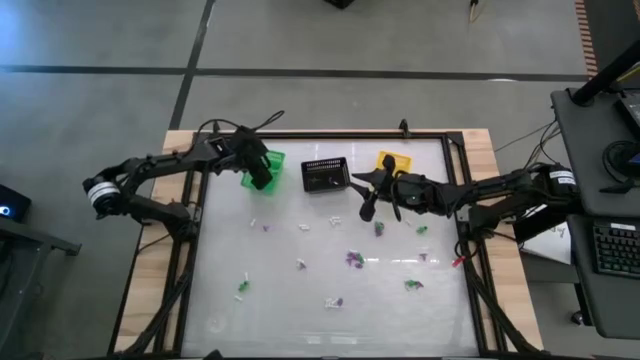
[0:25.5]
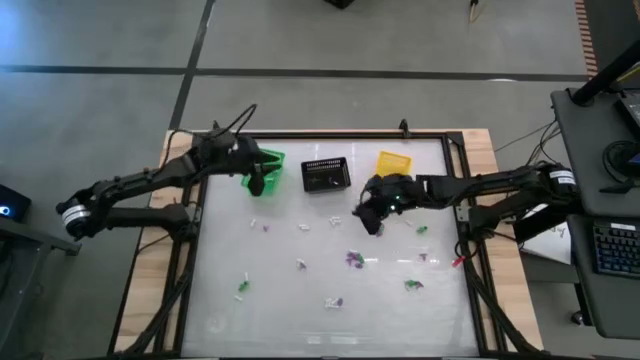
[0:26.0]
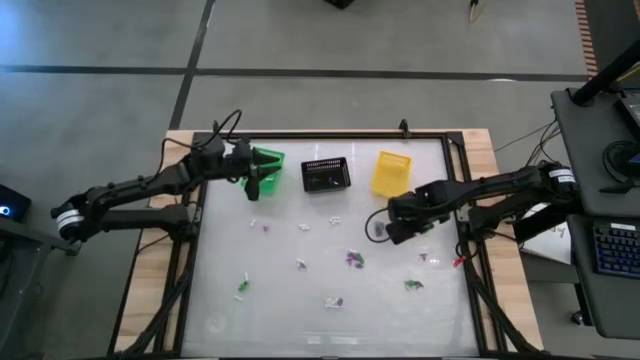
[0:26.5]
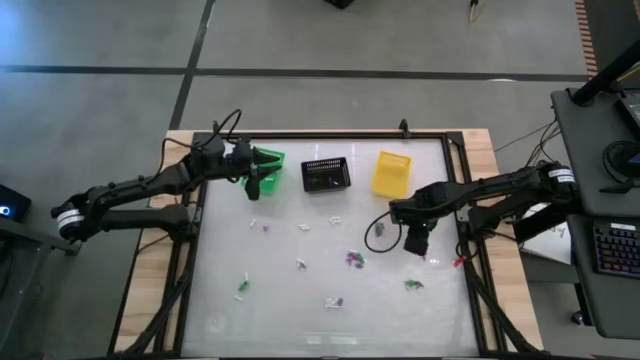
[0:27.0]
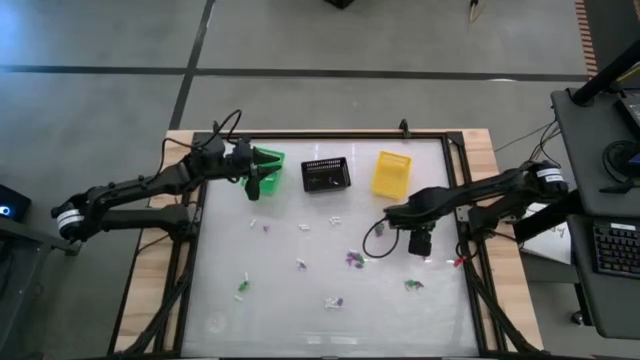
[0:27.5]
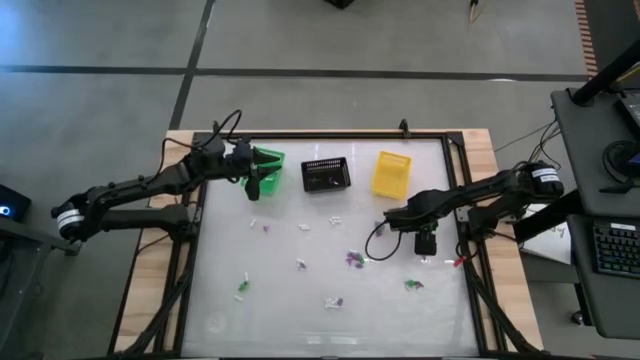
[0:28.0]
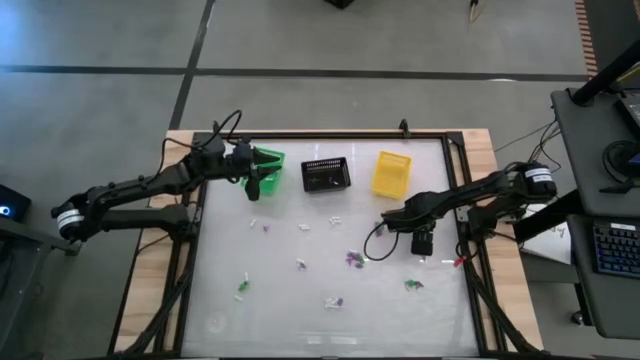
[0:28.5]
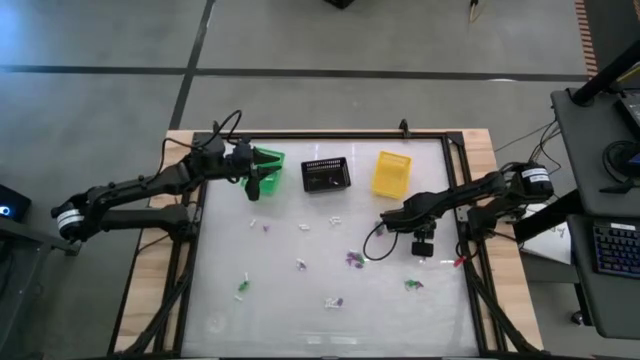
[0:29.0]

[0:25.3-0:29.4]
Task: Sort Halloween decoration
Put the green skeleton toy into the yellow basket

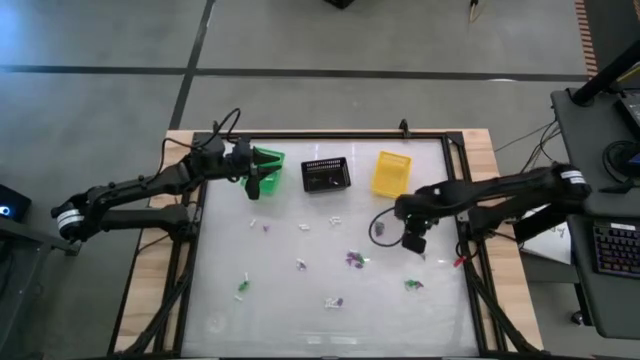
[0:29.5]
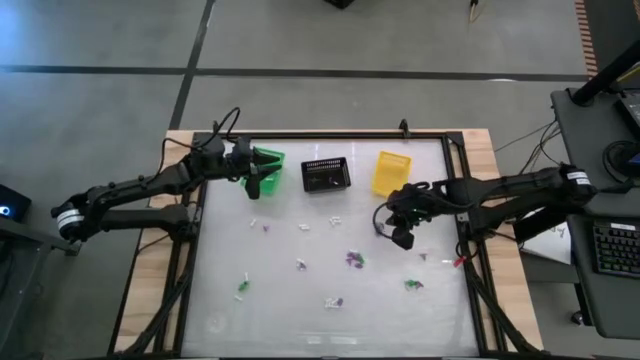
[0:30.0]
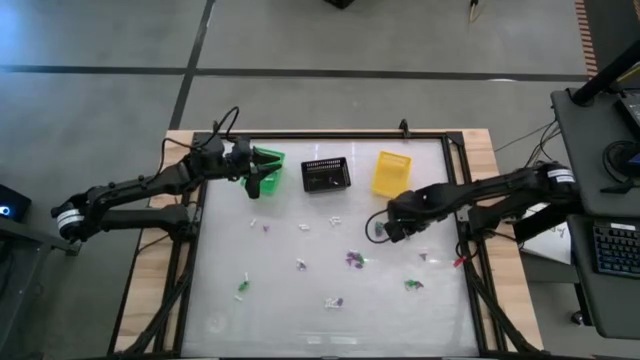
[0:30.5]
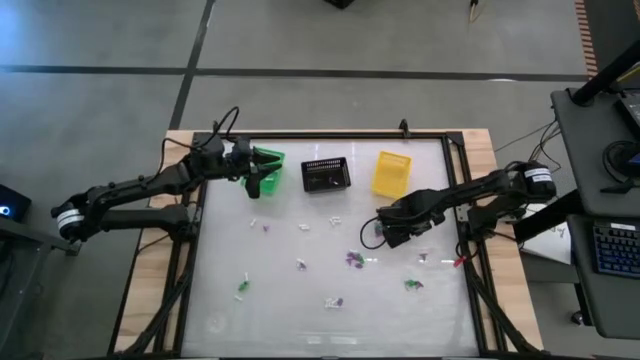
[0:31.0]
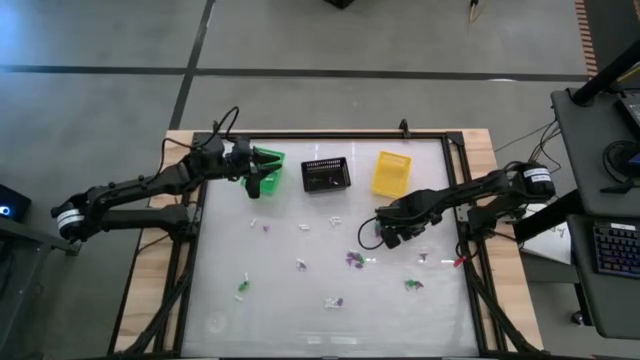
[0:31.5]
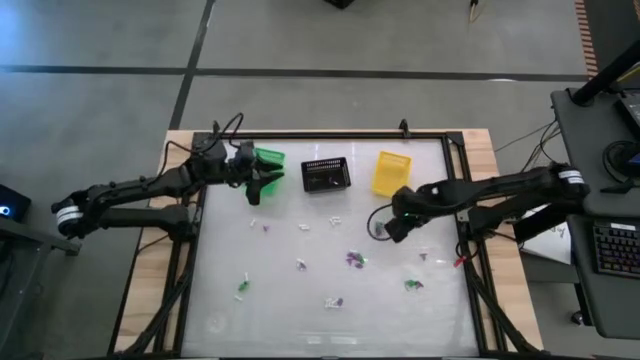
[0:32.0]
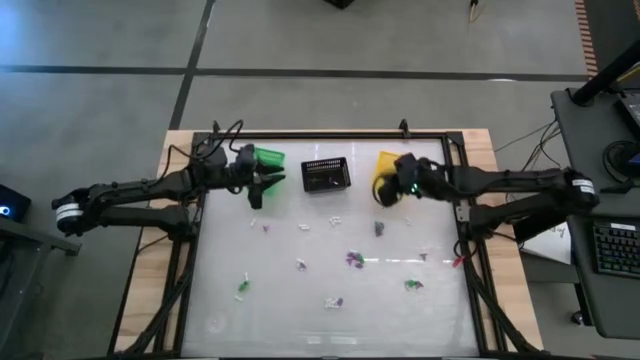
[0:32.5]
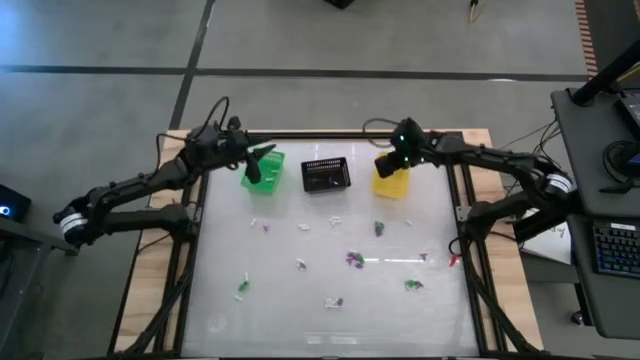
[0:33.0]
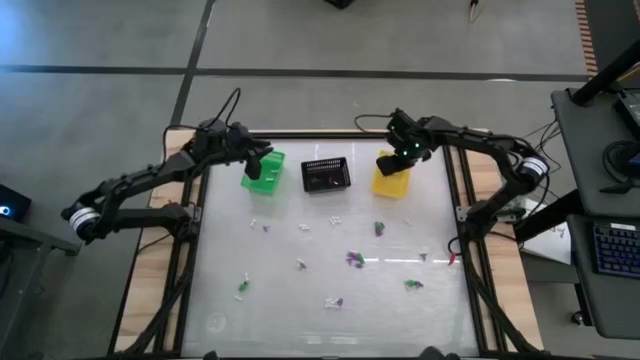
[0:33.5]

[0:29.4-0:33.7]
Put the green skeleton toy into the yellow basket

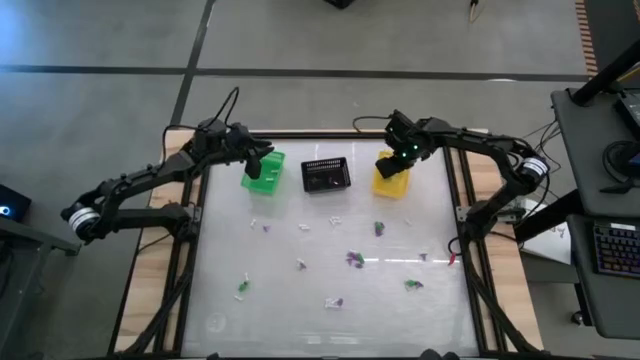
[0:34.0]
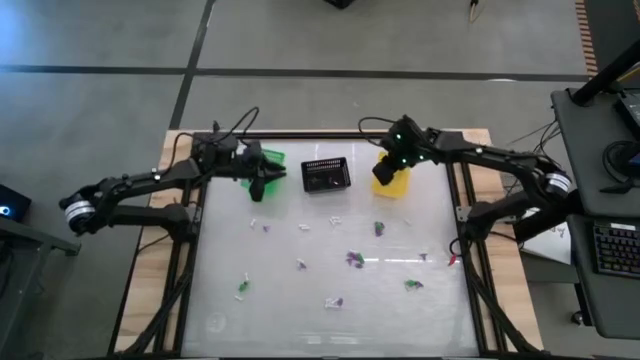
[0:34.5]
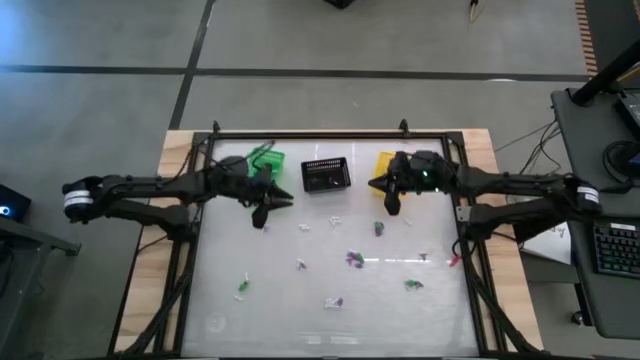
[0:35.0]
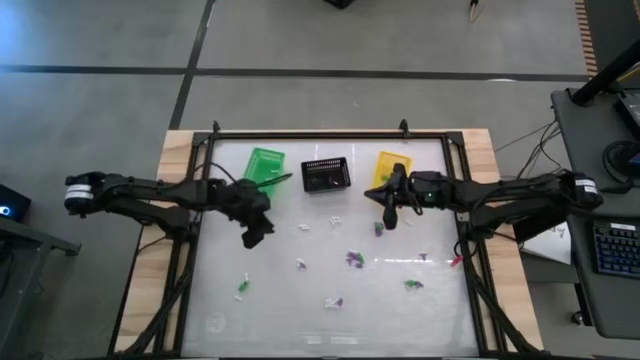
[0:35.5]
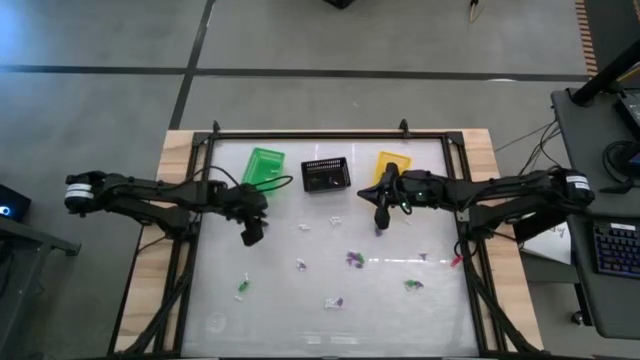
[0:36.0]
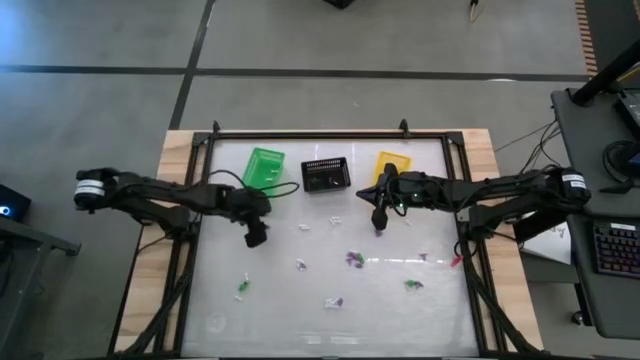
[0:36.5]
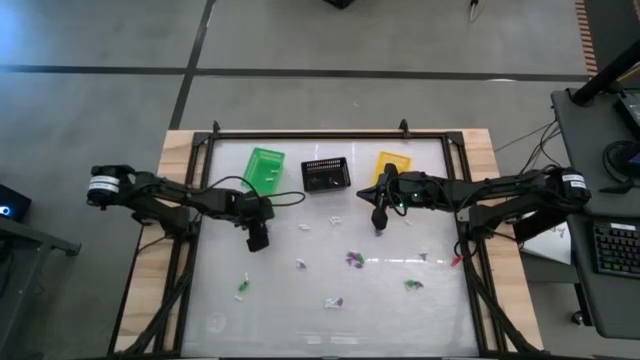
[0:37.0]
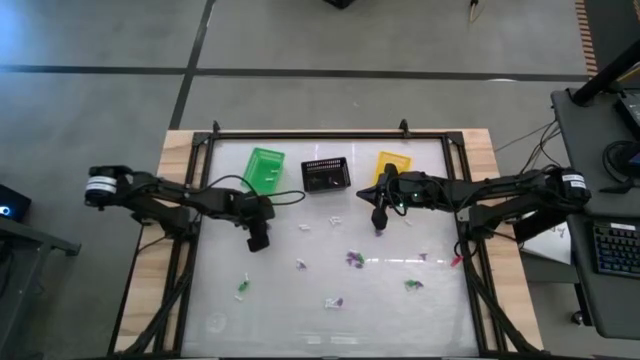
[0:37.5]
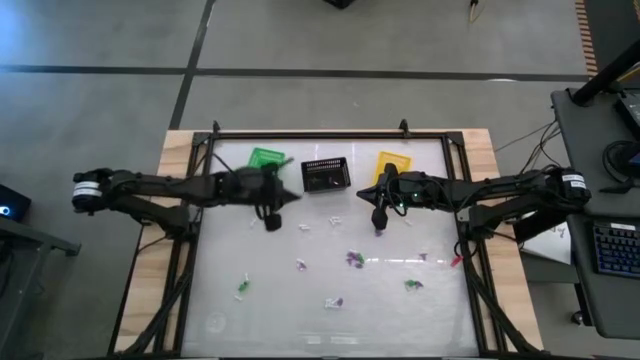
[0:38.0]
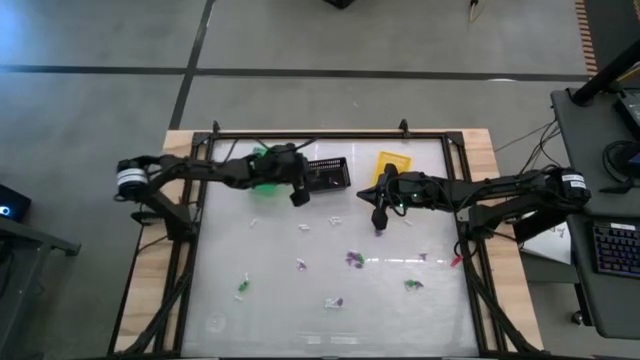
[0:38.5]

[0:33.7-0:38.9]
Put the purple witch hat toy into the black basket

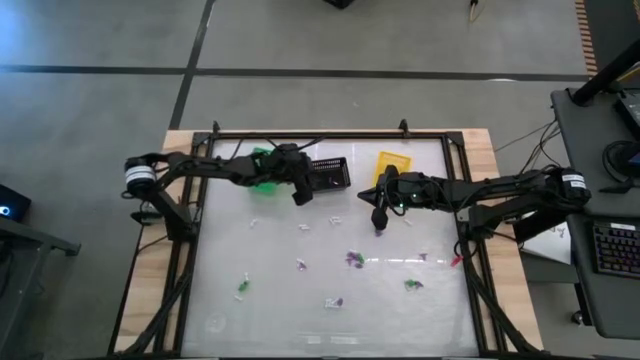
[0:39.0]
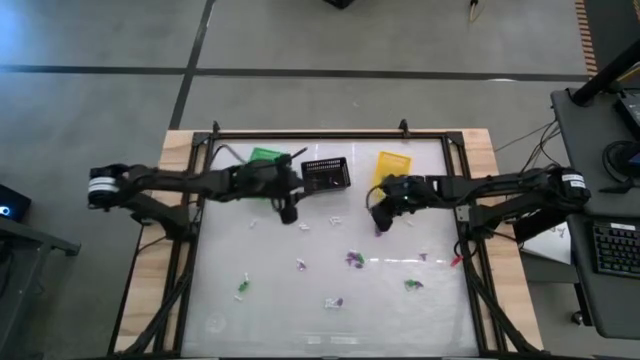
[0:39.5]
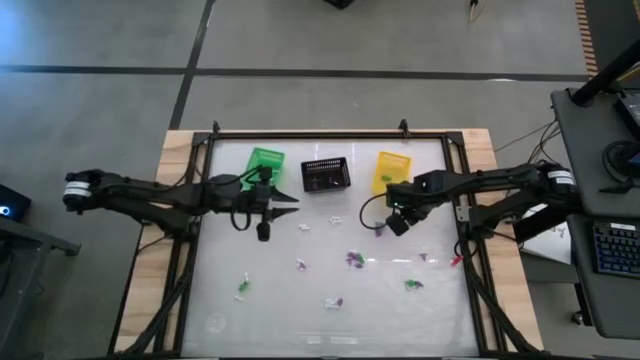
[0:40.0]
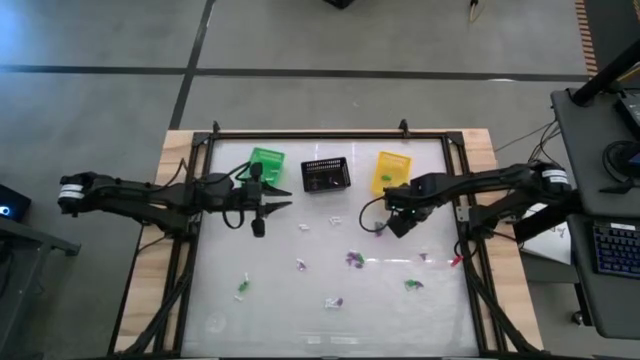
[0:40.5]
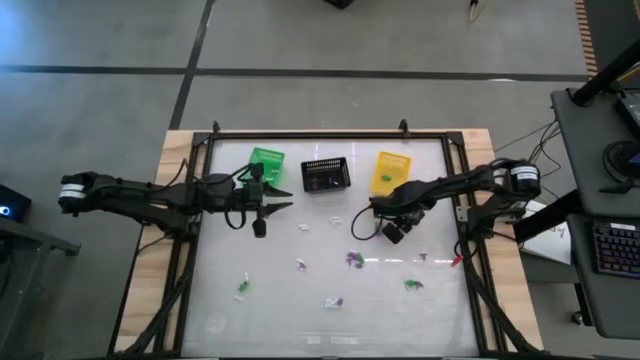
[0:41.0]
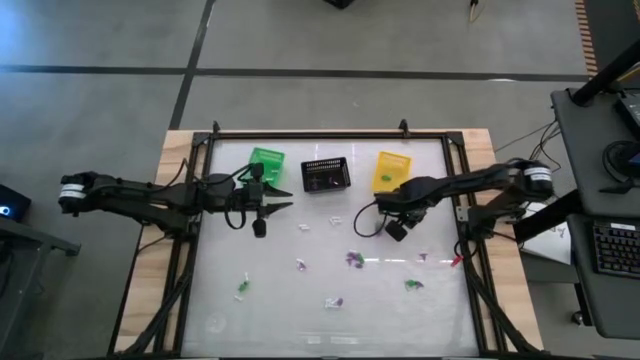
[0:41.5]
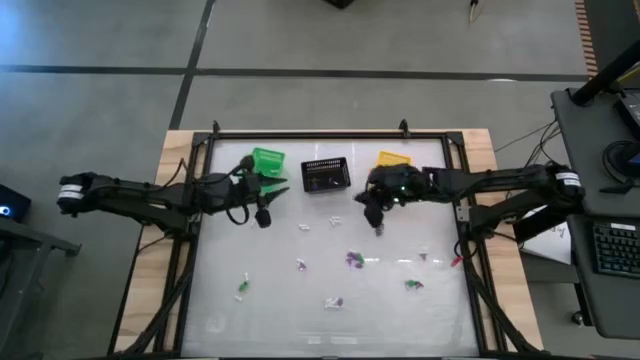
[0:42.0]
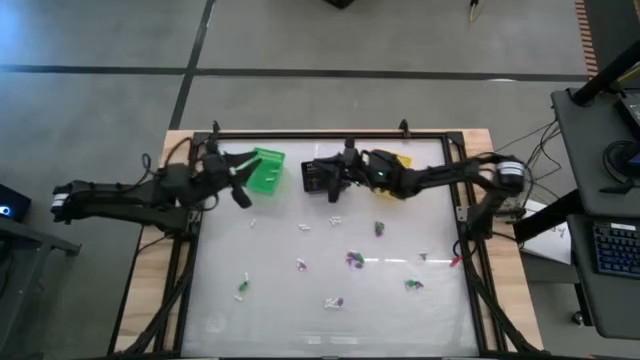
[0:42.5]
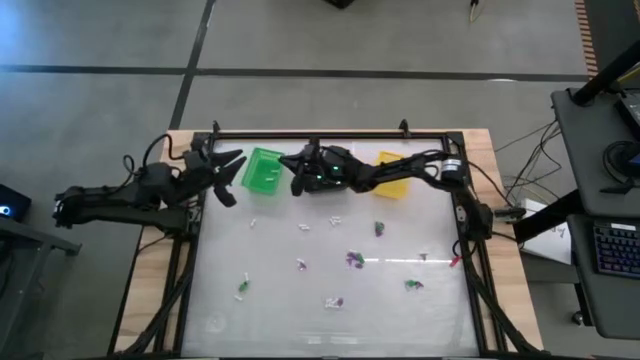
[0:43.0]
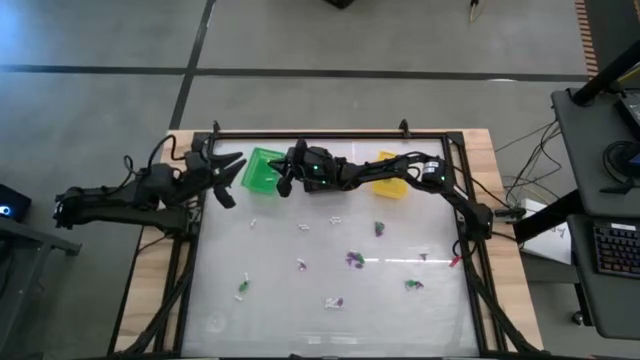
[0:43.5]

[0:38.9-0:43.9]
Put the white bone toy into the green basket

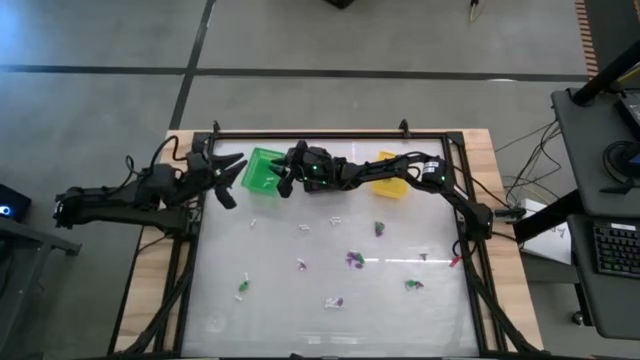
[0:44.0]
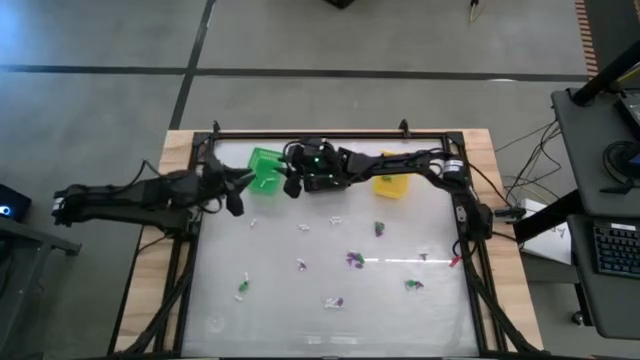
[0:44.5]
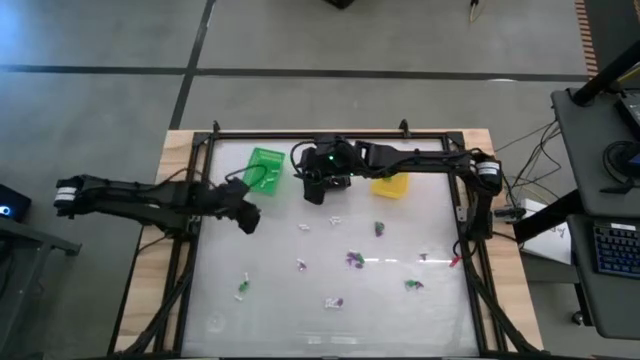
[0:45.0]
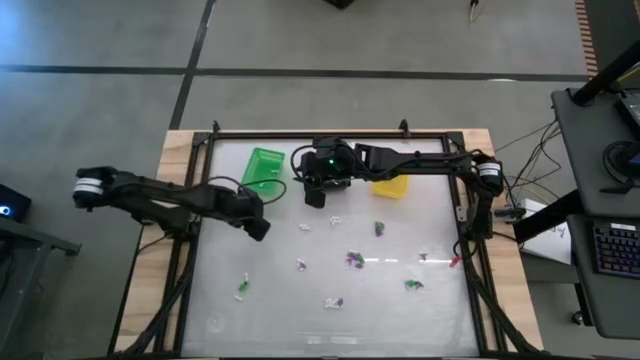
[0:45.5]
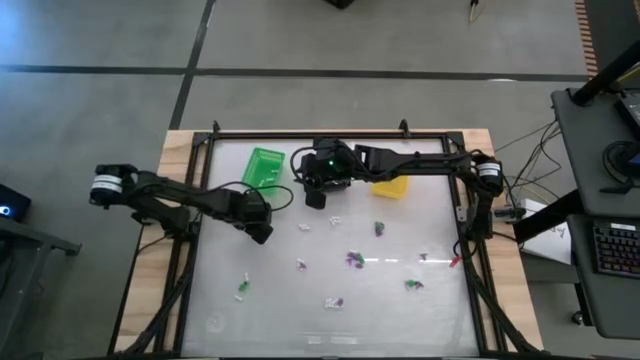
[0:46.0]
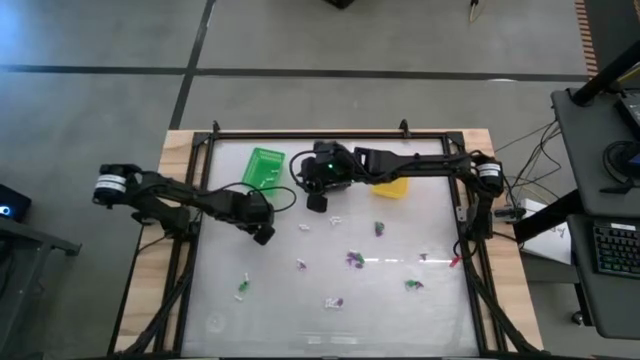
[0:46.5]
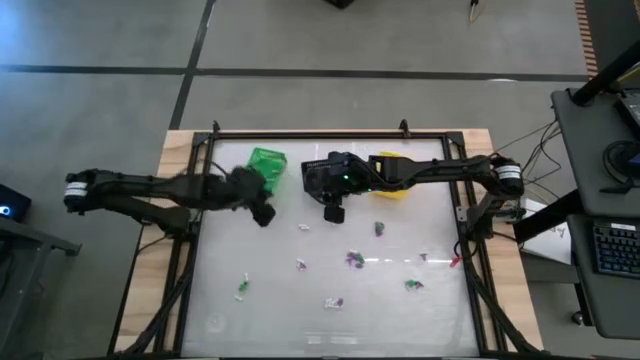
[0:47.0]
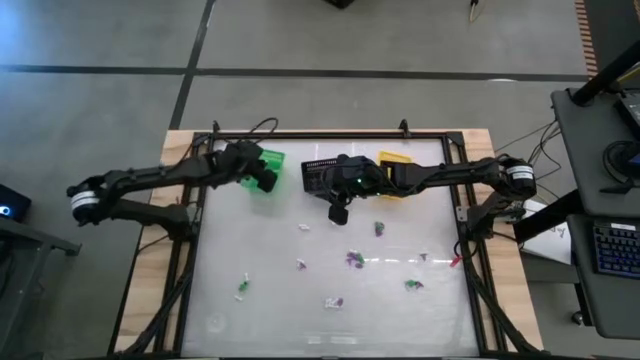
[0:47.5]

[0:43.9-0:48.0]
Put the white bone toy into the green basket
